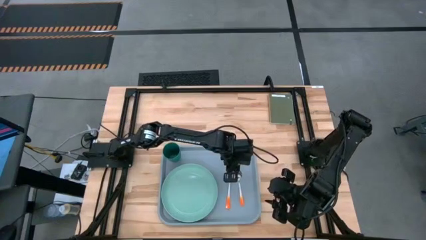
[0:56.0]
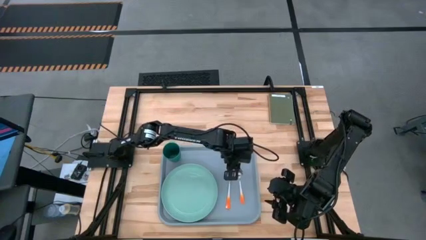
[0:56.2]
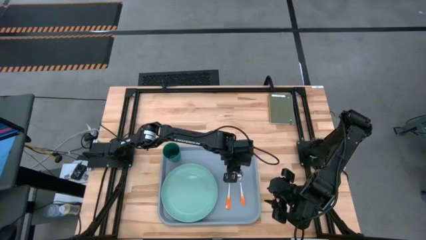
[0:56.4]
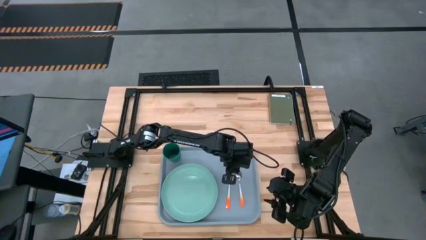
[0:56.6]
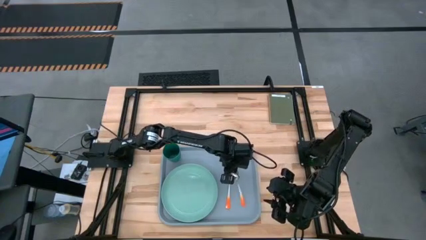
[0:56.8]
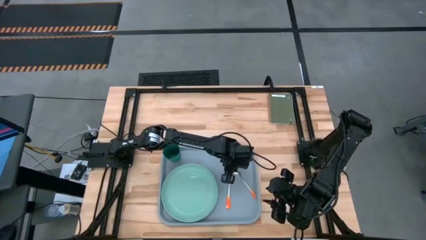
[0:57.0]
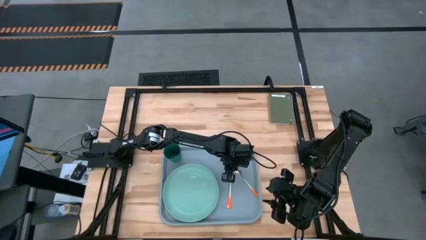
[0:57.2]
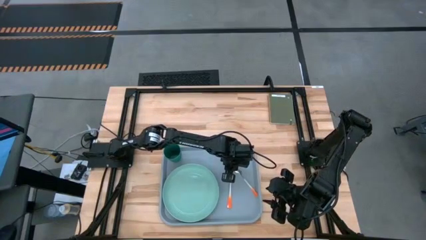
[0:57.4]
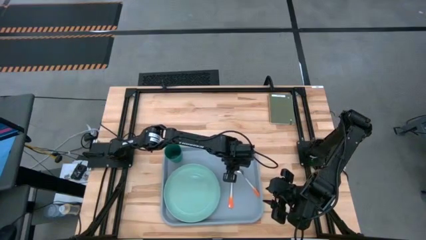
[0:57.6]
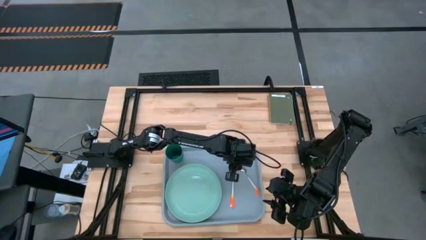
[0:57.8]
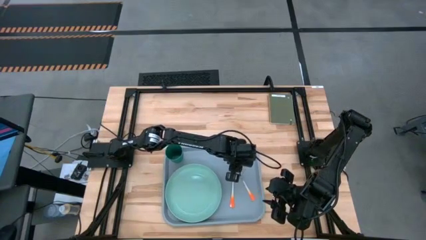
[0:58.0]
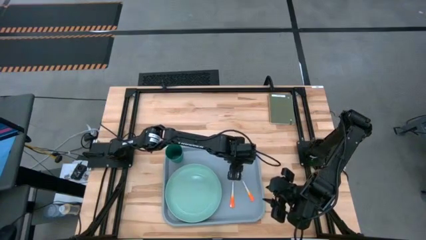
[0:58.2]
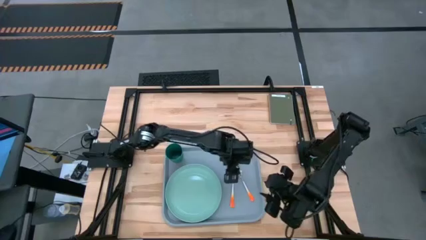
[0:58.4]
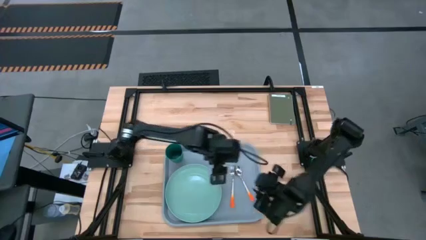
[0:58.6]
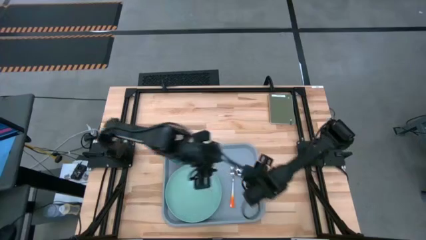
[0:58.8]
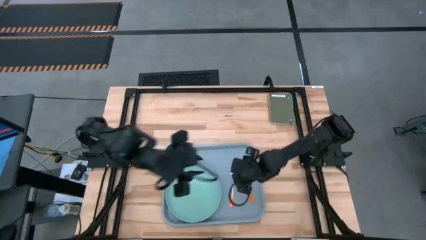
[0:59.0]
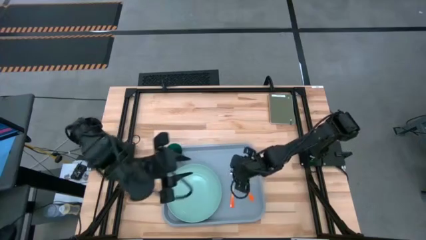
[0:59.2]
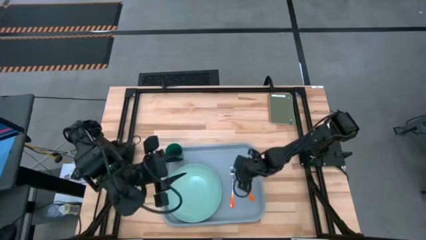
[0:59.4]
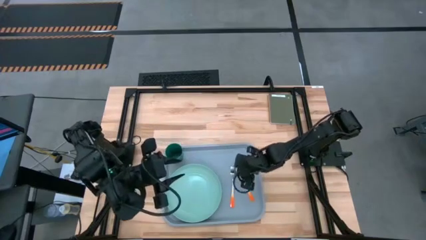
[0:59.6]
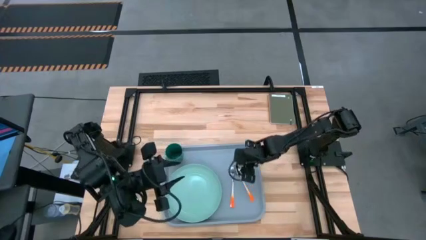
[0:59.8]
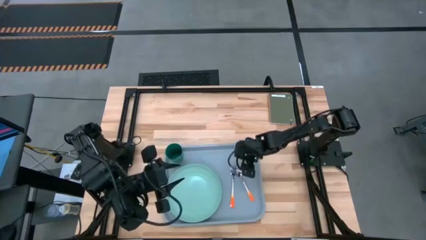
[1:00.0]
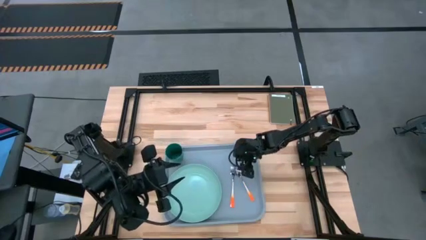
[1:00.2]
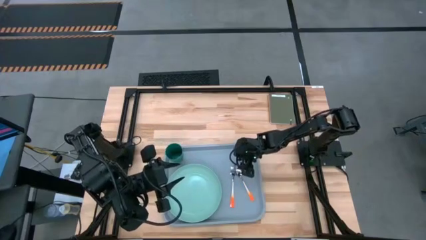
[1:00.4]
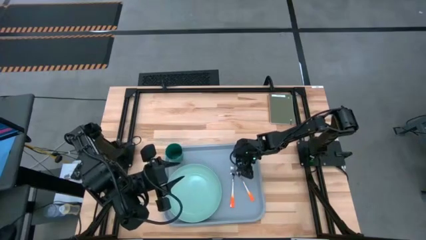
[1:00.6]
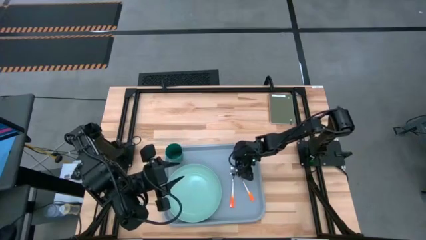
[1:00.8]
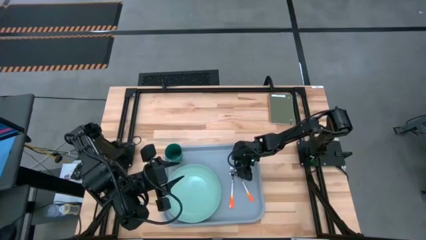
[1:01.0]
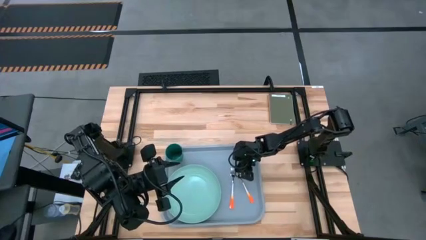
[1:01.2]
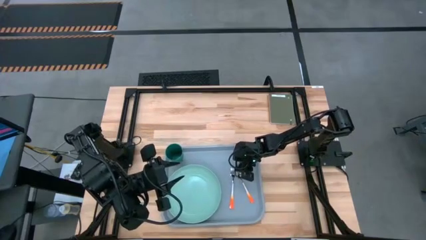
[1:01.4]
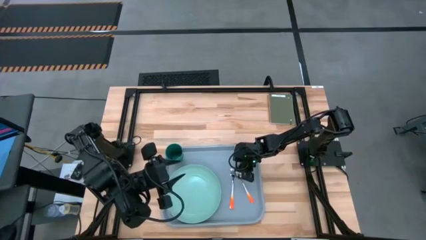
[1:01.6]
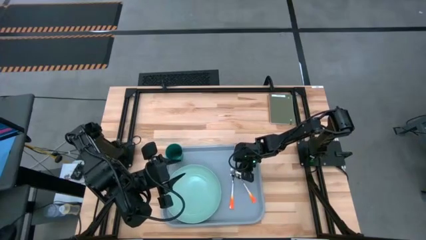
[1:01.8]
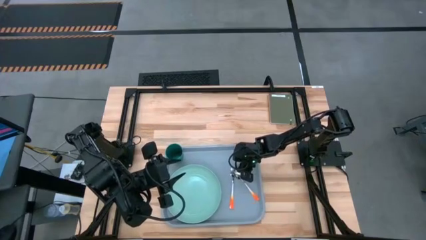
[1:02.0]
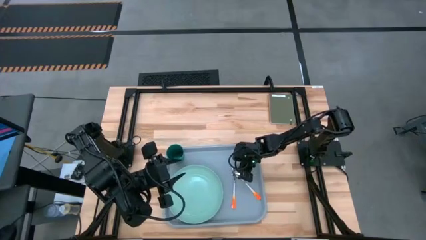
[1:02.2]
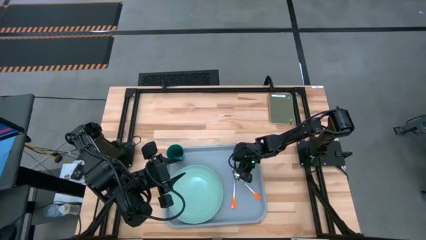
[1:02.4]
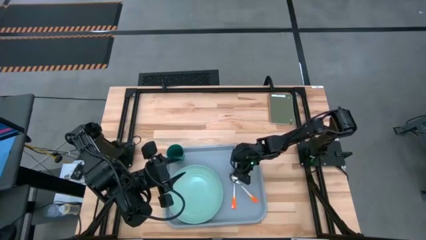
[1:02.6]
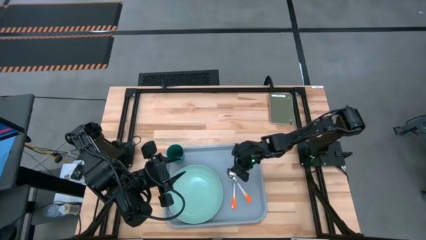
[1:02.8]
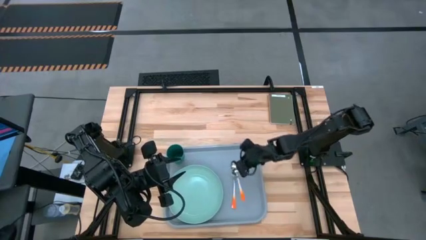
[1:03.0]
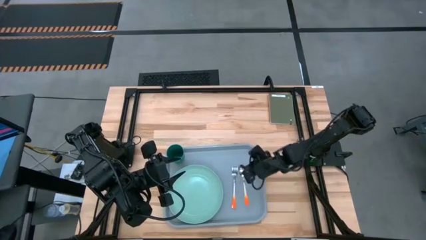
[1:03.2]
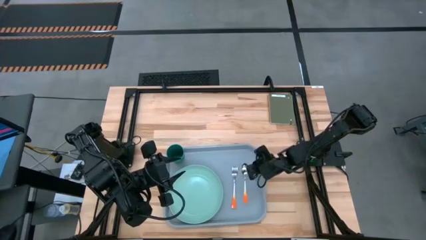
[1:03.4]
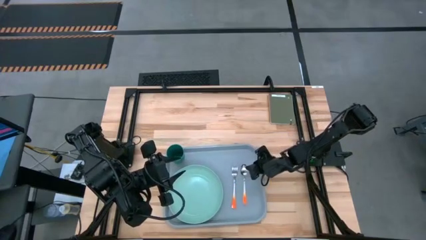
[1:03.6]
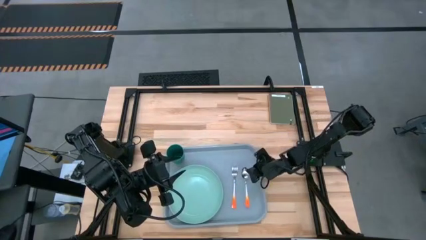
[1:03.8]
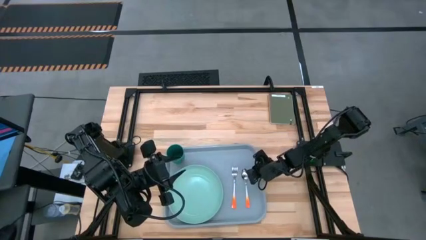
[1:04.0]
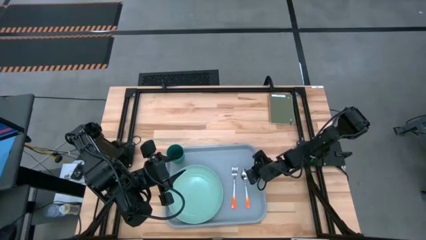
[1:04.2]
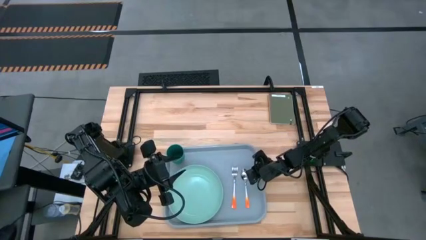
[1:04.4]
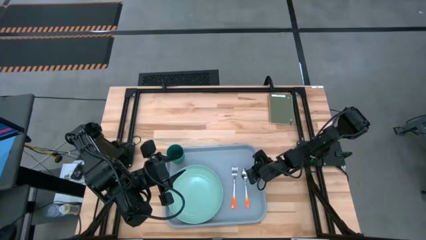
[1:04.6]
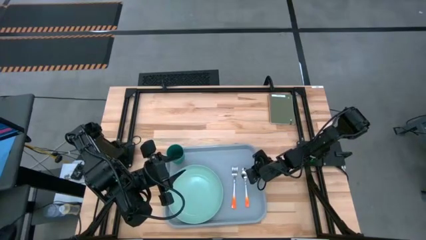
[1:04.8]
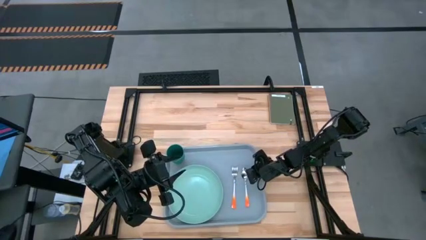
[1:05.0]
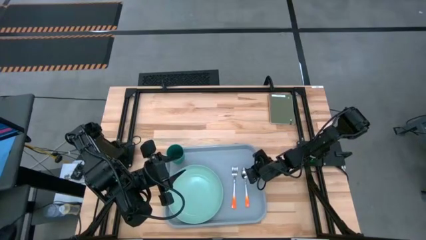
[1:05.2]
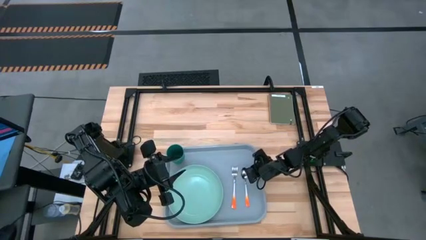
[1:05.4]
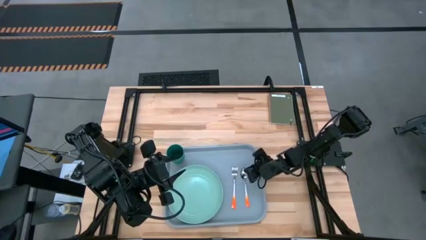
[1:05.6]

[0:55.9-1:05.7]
Task: Pick and place plate/cup/fork/spoon on tray
Put the orange spoon to the right side of the blue plate on the blue serving tray

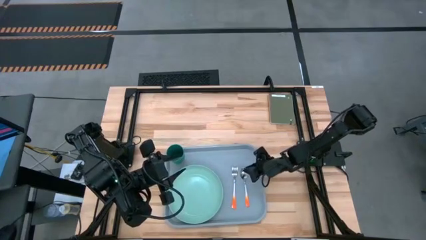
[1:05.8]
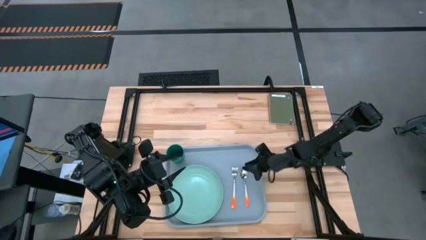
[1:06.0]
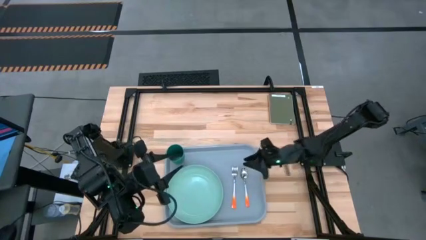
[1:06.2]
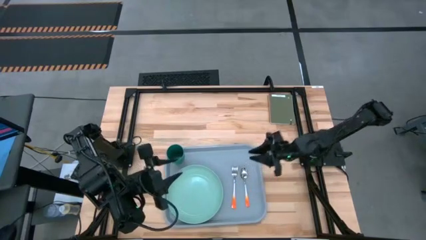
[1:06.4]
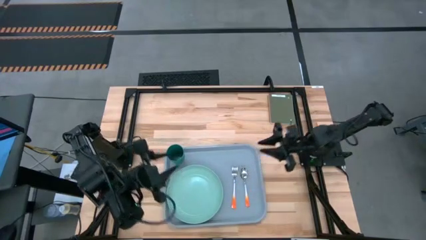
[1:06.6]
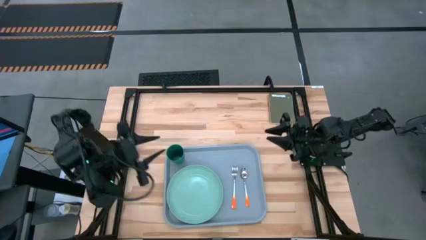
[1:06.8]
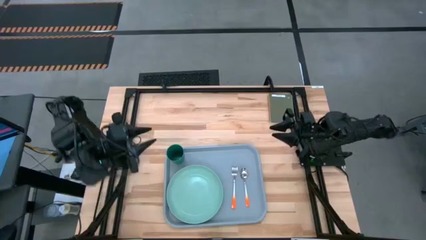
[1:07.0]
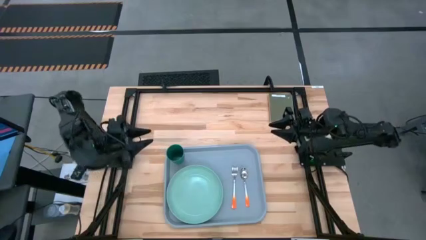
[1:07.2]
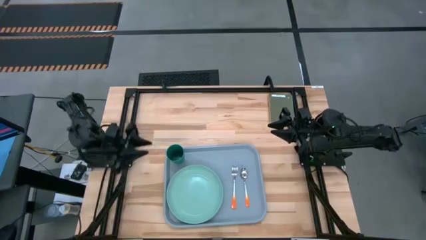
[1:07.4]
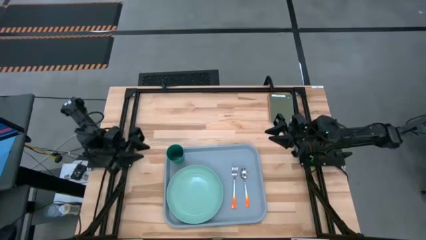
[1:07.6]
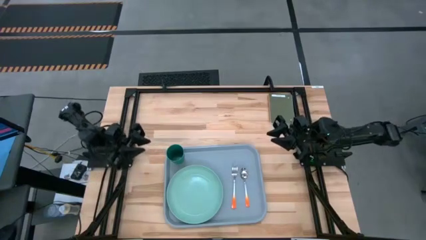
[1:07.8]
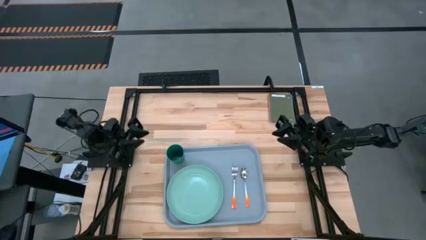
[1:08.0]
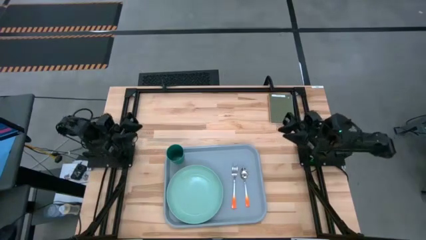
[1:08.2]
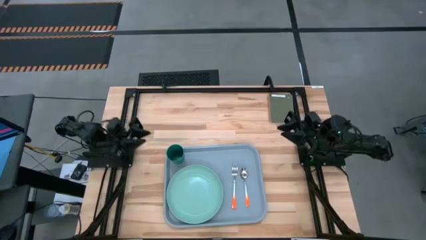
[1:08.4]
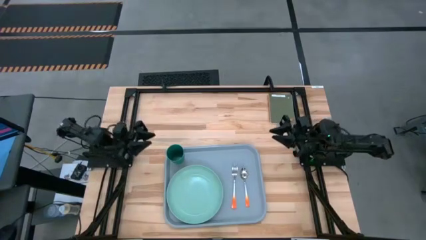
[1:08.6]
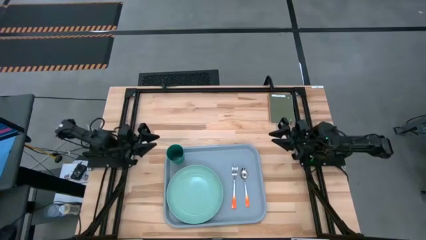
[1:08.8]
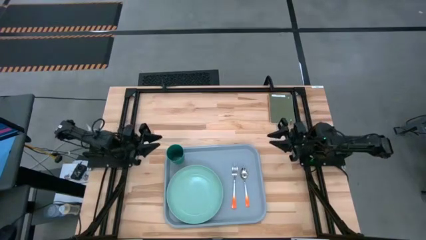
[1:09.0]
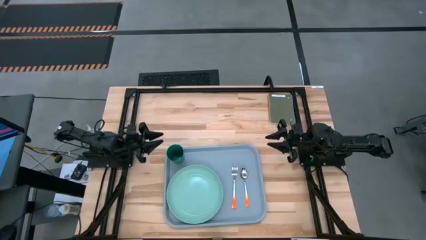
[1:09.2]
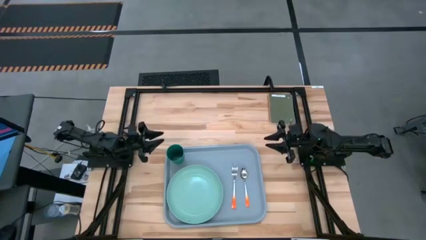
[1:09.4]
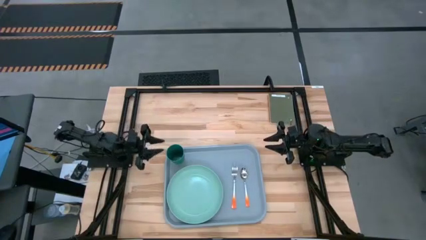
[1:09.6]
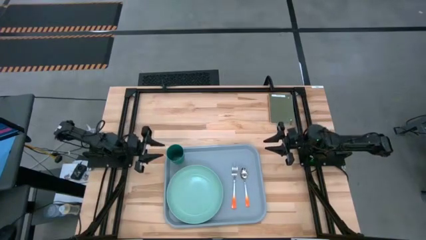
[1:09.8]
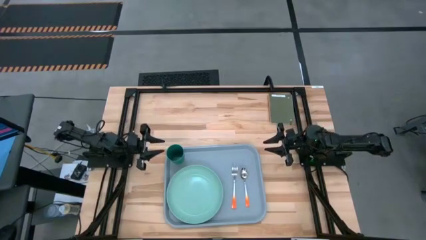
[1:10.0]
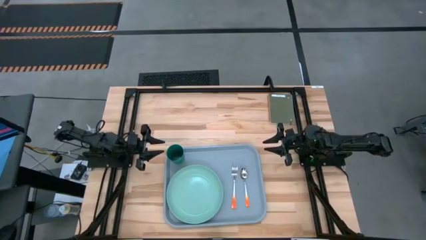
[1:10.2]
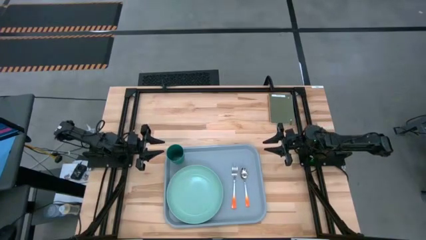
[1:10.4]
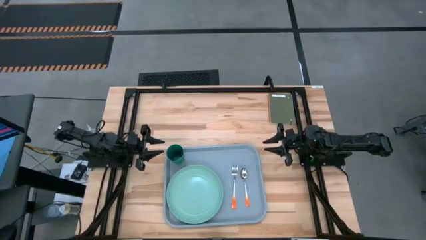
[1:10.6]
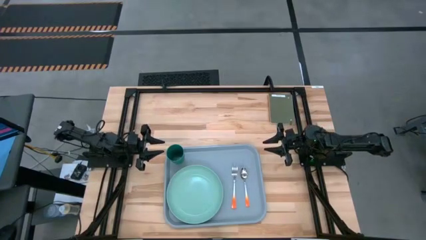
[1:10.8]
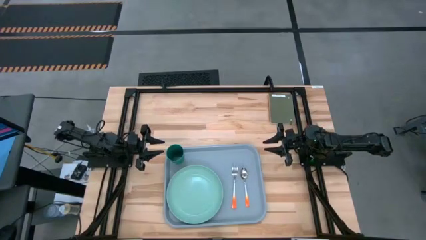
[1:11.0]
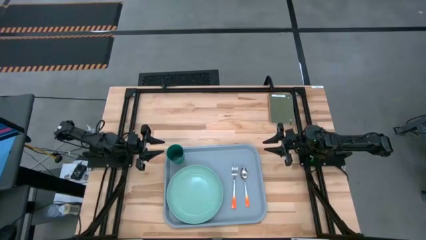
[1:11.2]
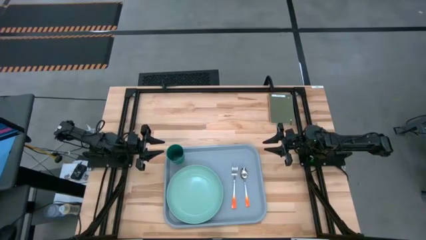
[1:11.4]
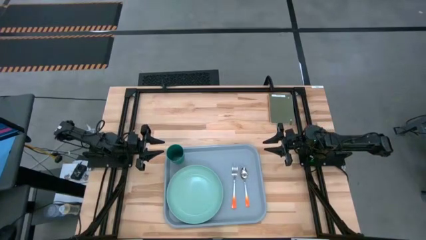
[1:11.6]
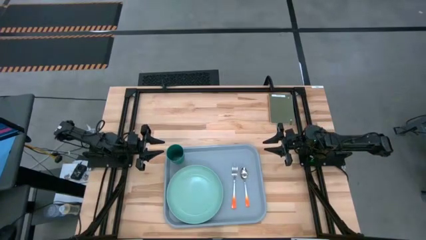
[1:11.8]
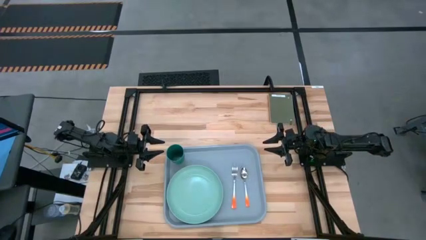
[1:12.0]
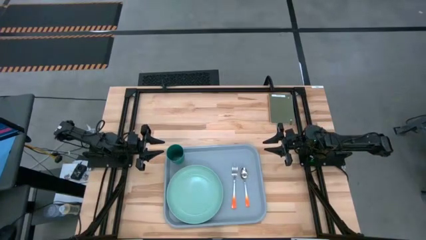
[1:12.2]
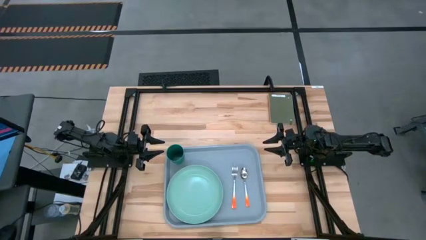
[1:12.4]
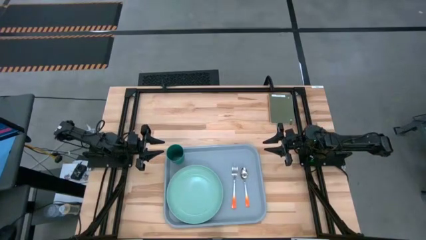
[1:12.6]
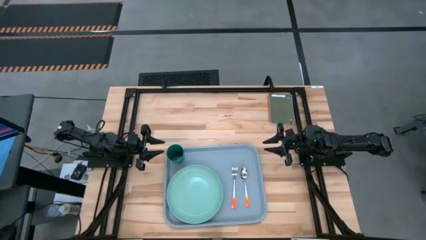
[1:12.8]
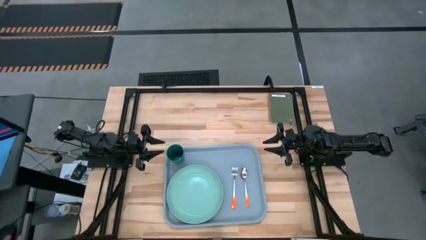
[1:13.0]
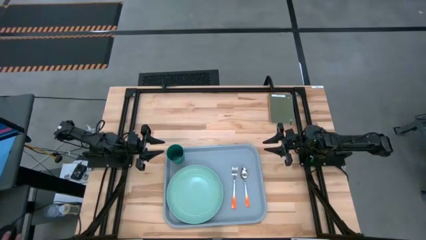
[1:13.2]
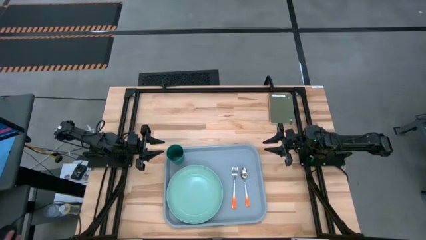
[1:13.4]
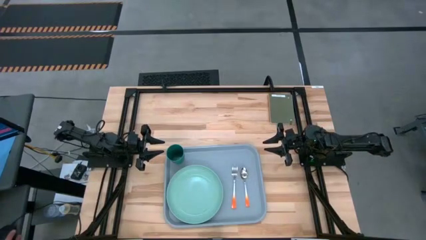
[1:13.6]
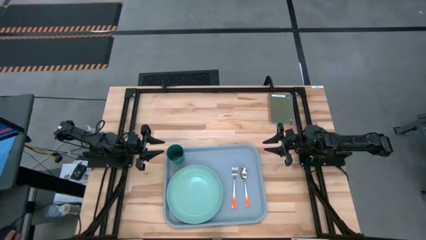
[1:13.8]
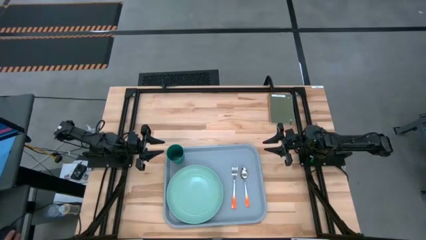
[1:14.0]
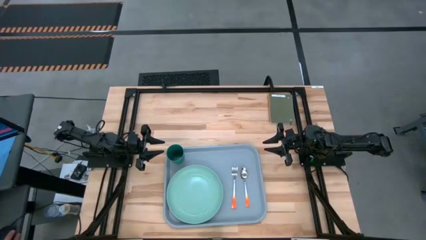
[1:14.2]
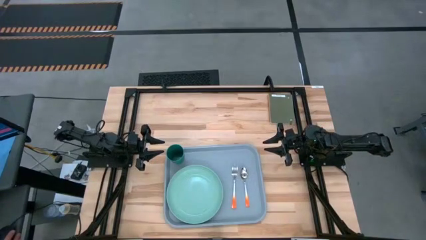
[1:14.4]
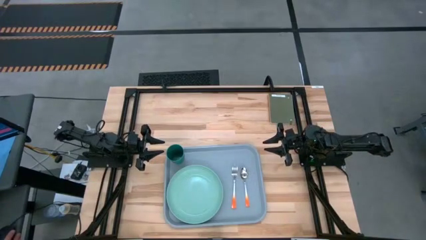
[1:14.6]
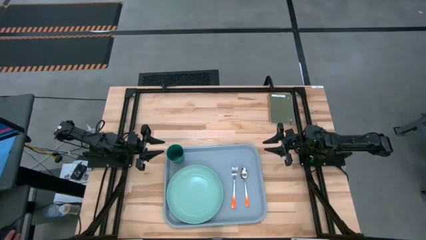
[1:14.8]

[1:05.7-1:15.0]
Return to Home Position
